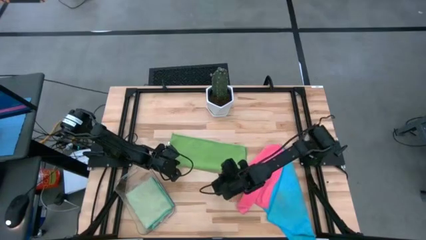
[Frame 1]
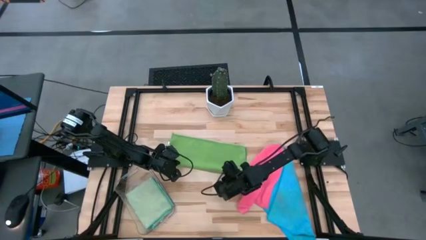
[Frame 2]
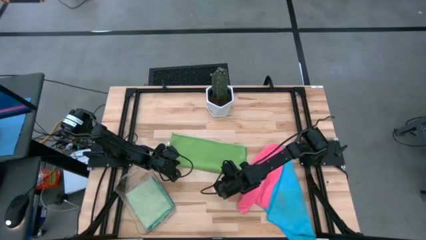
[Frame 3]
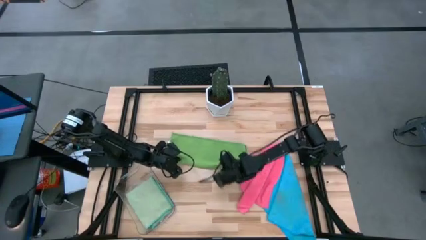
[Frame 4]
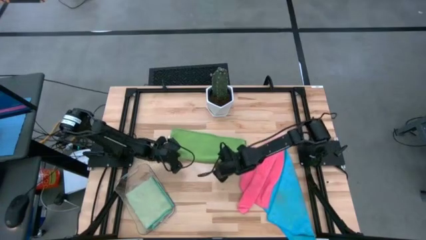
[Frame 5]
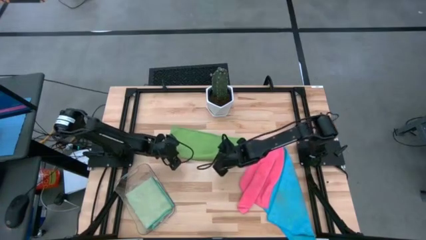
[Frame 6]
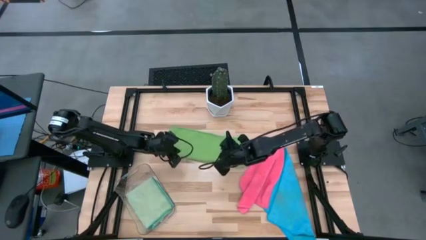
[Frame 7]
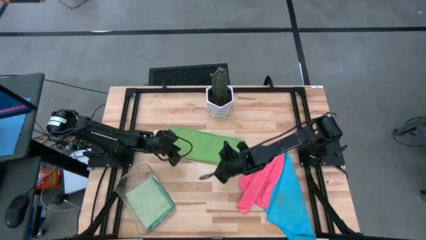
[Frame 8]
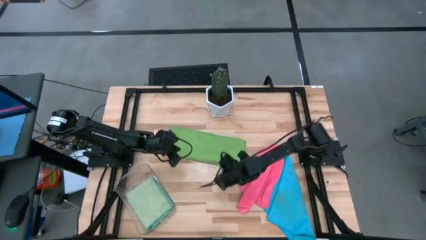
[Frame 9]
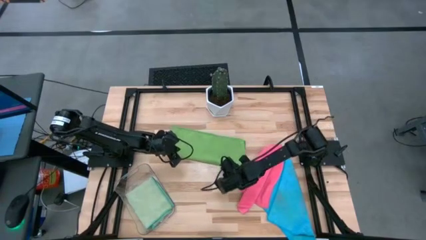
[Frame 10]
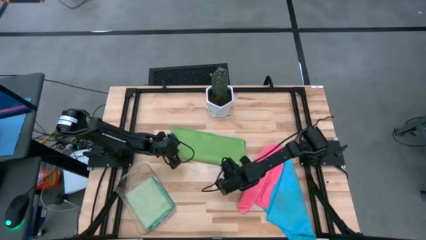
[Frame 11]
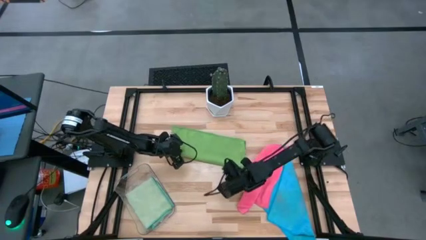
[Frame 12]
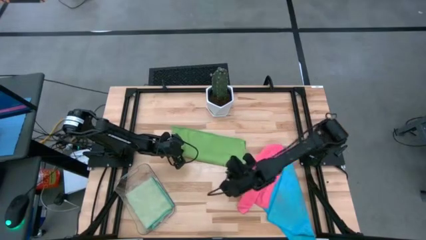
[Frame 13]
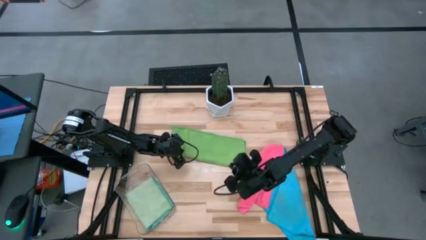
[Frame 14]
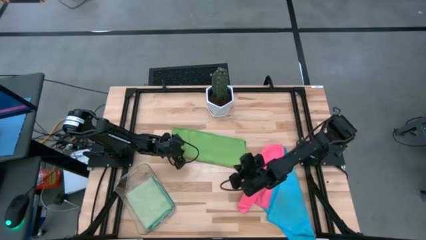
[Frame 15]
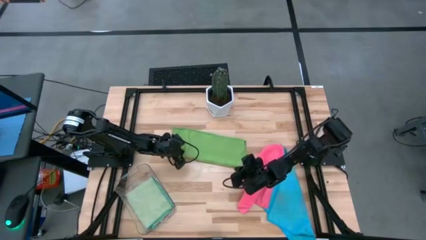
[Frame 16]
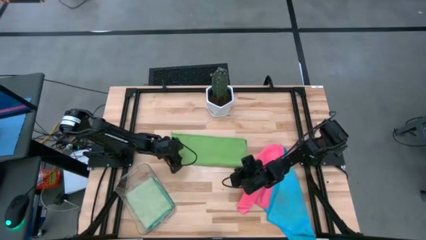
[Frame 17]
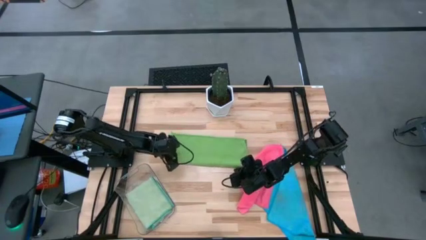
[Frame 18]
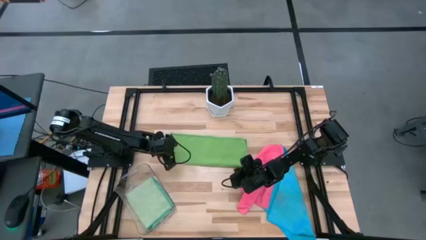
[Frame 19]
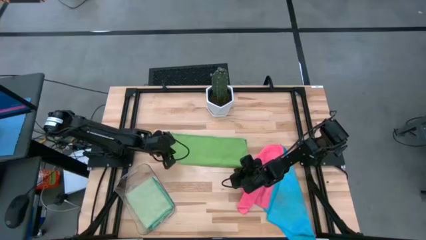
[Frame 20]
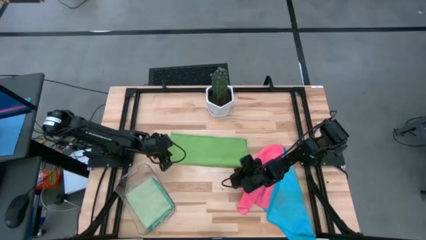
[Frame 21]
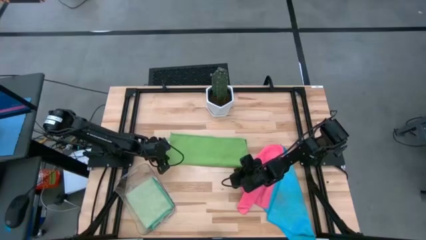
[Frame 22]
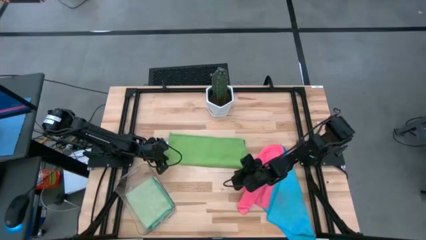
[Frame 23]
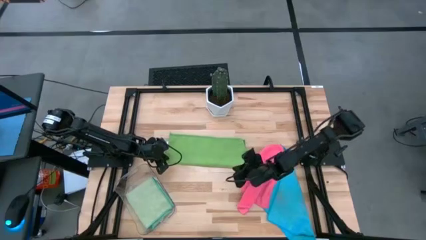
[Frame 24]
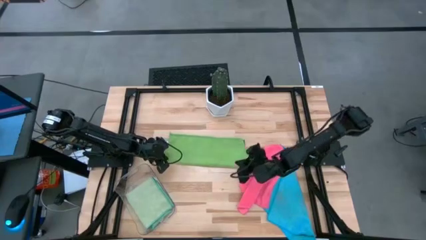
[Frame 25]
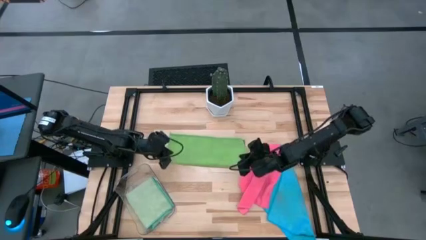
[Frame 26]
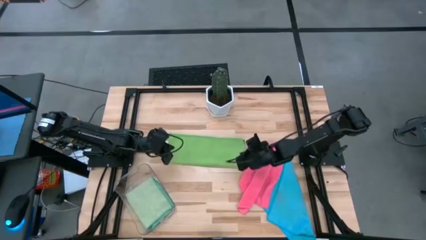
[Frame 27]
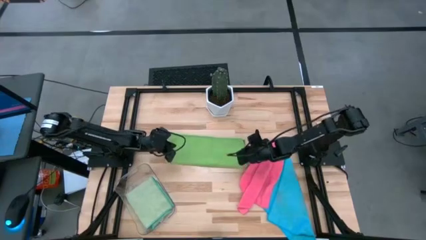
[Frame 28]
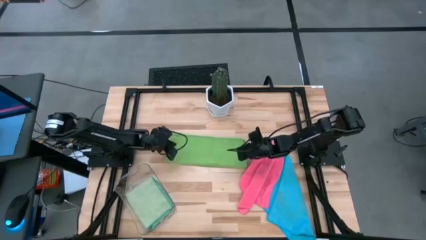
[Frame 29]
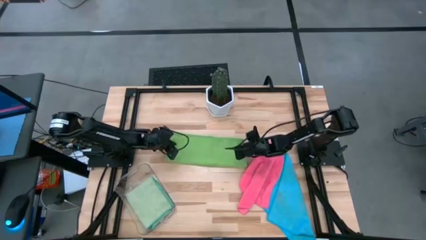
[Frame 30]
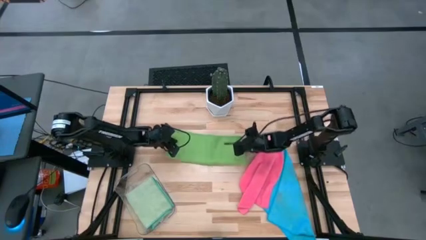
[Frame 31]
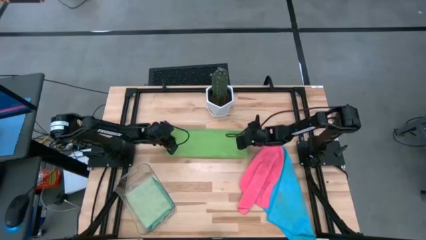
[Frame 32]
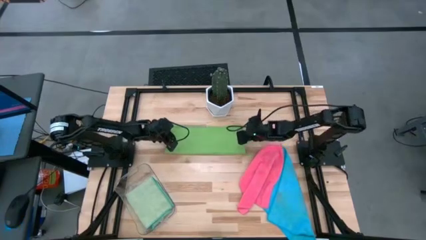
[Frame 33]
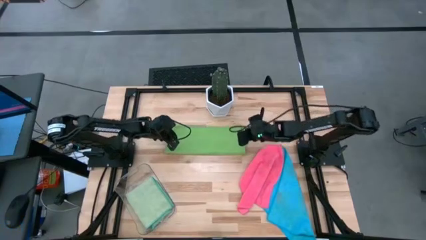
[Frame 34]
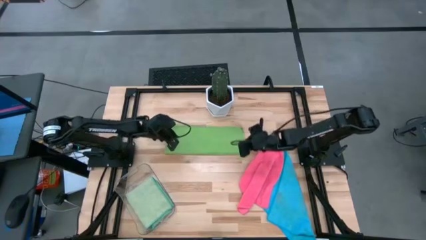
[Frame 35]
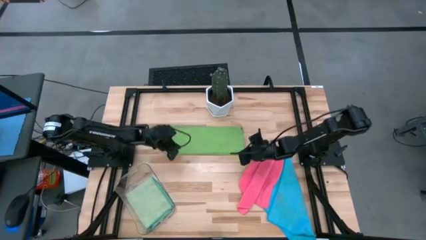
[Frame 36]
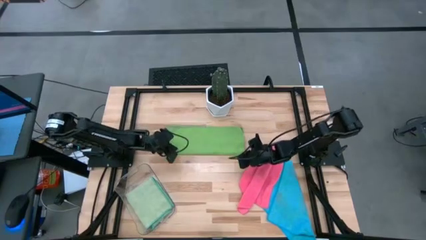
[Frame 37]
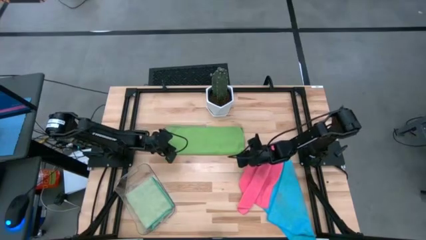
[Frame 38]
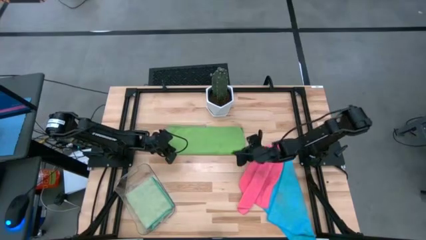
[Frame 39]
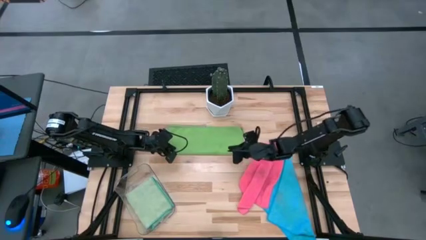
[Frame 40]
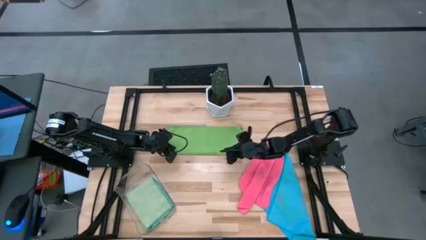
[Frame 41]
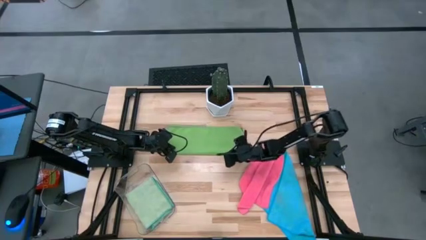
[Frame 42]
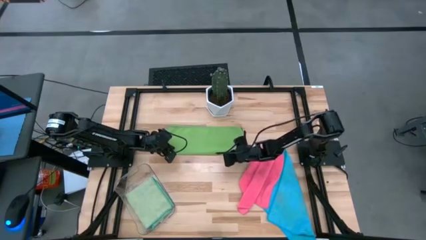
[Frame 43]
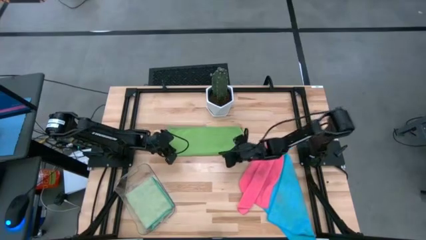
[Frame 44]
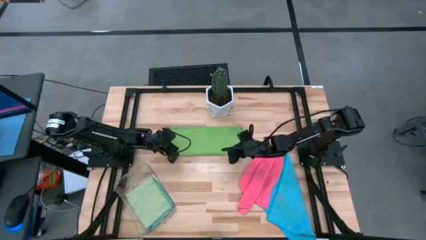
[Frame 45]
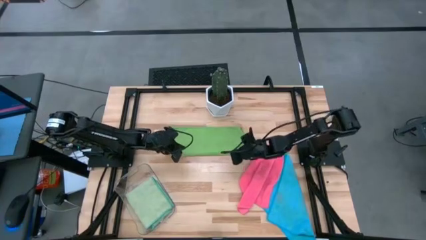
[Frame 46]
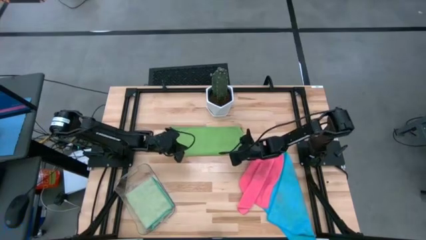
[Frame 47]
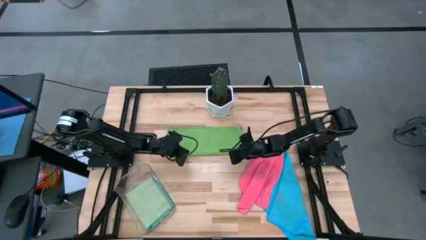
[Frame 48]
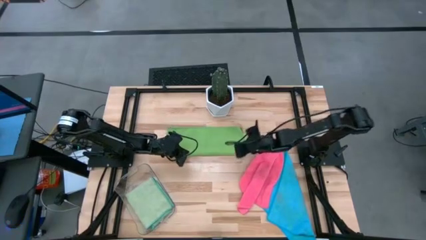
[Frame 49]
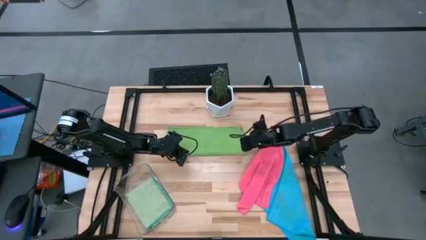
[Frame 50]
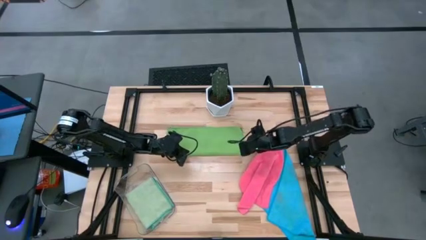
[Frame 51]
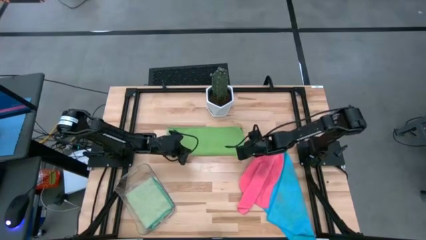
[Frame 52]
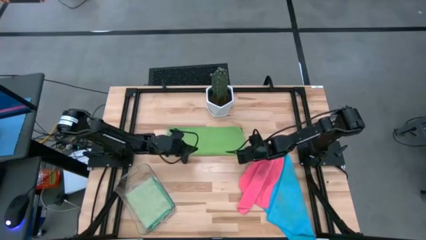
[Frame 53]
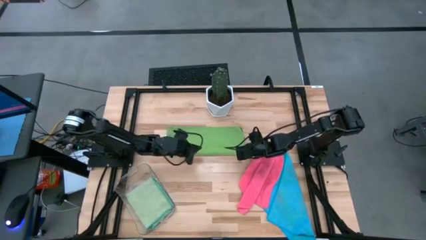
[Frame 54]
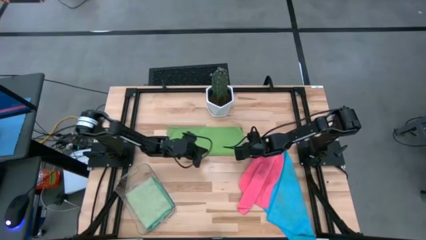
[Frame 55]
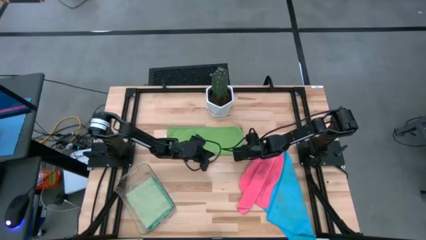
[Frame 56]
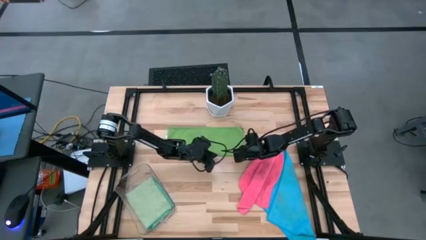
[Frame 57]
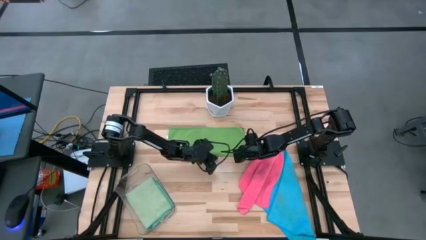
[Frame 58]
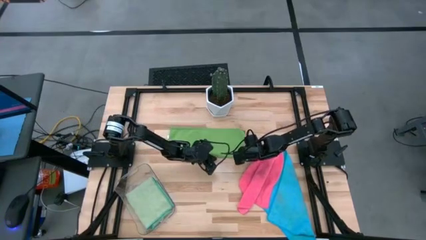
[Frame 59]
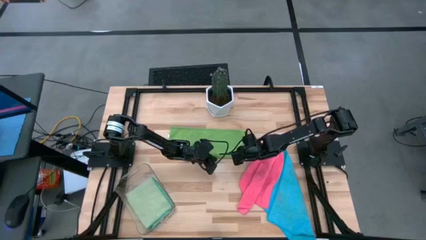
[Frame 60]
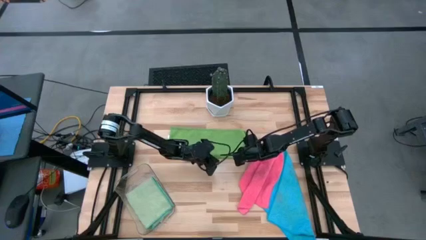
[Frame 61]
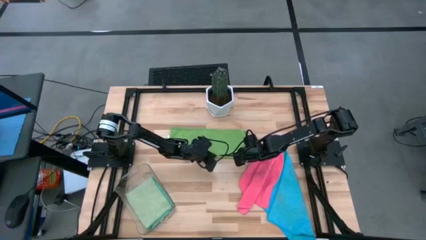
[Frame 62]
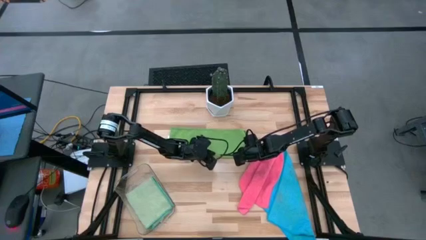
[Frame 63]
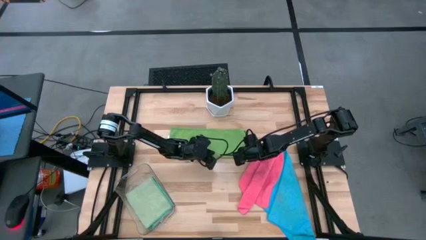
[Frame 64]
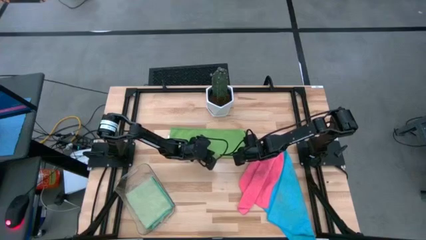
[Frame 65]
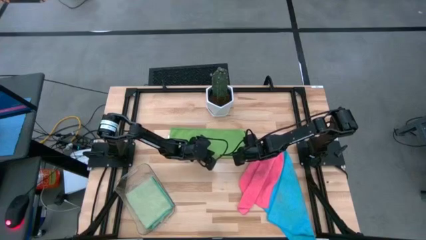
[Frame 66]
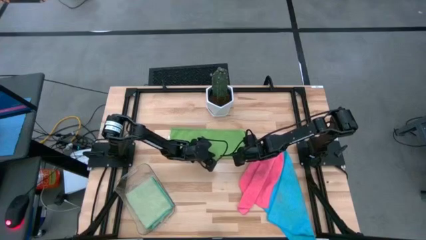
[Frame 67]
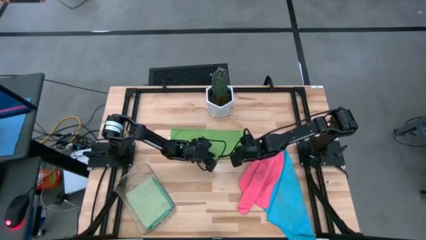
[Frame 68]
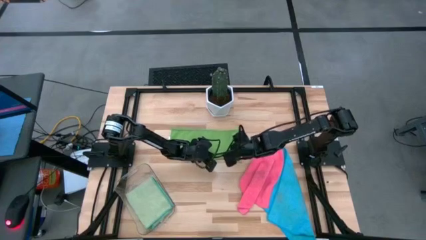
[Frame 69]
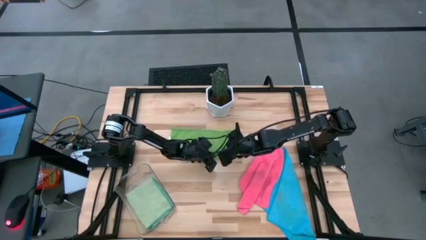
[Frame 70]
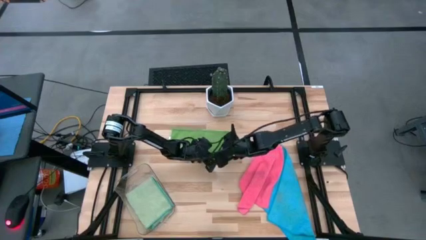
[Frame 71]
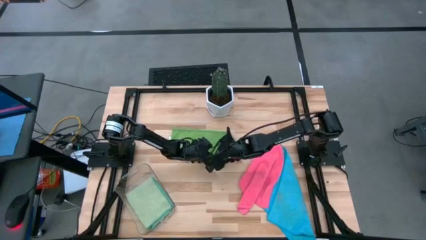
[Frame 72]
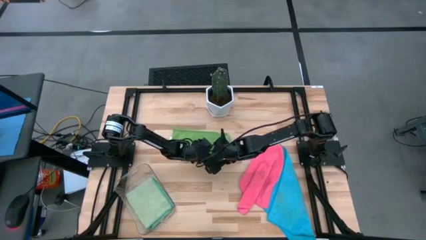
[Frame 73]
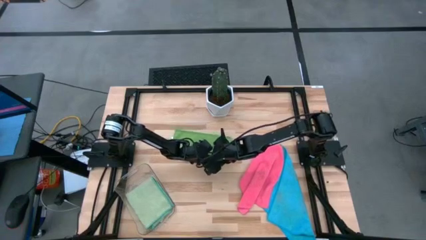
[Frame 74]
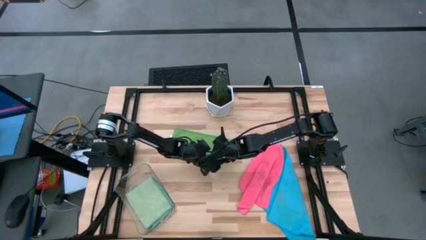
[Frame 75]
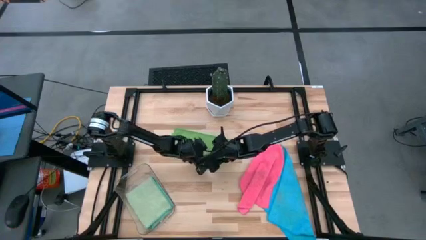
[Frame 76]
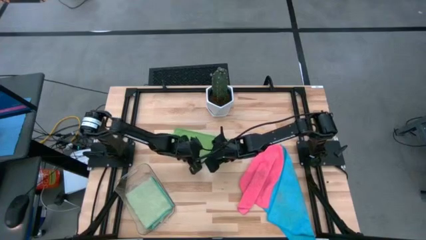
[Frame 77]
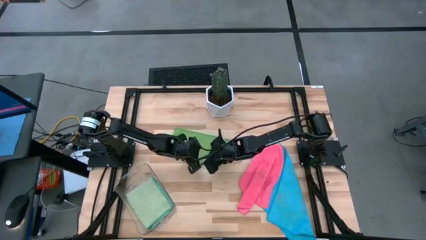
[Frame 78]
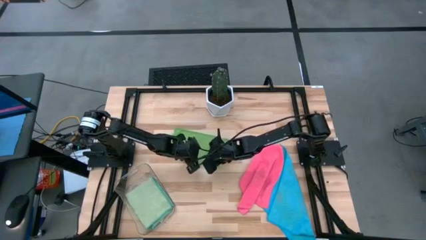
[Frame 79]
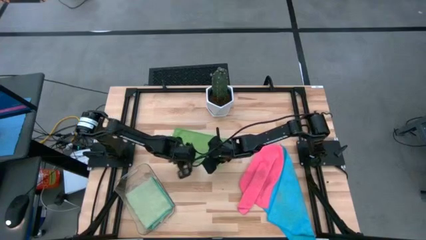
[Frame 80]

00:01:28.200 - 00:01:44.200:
Task: Fold microfiber towels
Fold the green microfiber cloth
